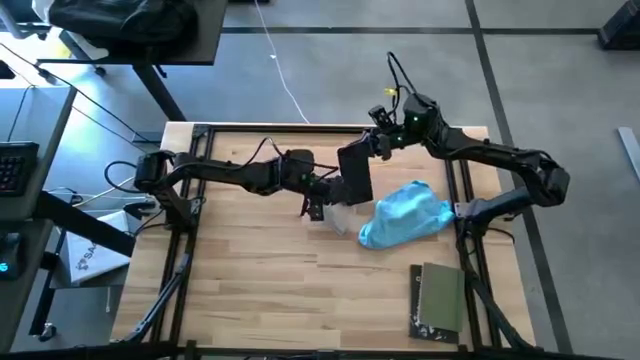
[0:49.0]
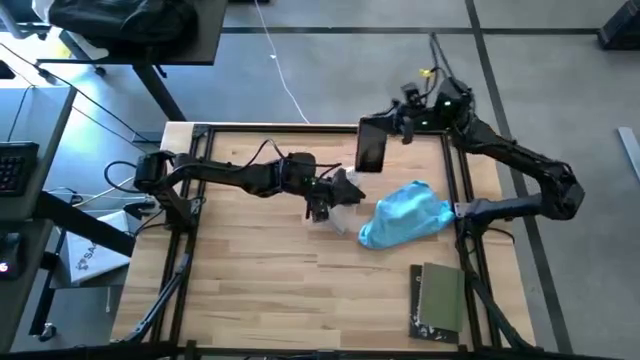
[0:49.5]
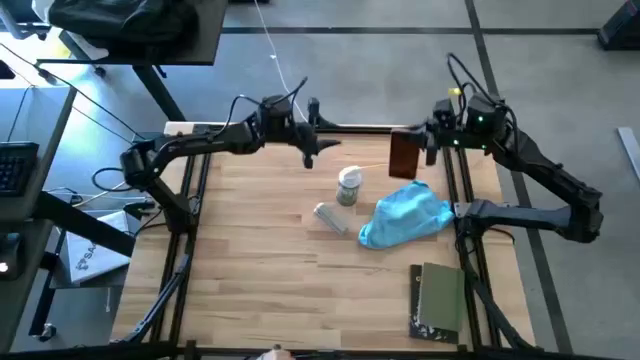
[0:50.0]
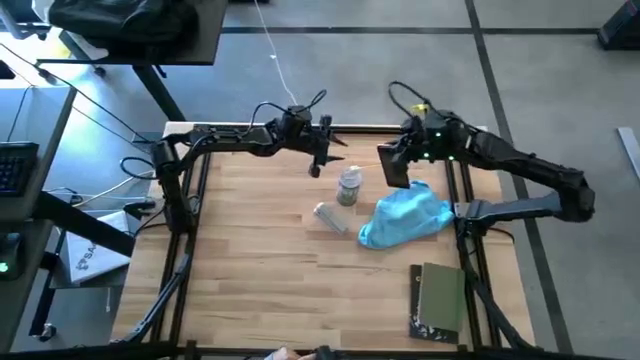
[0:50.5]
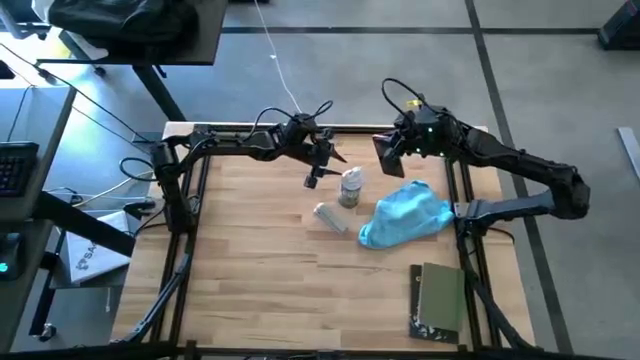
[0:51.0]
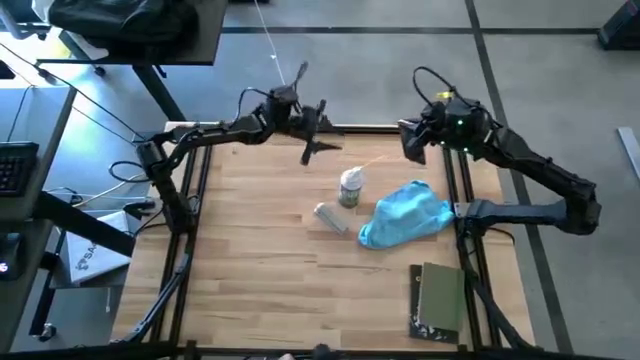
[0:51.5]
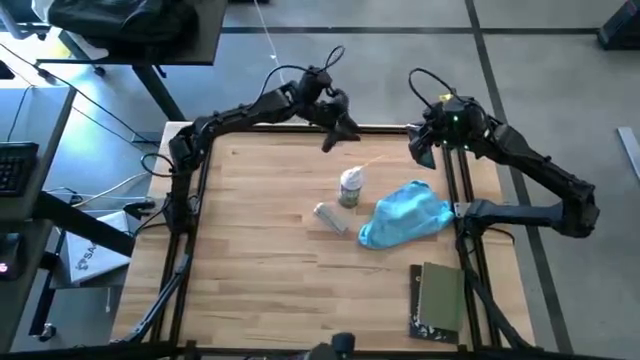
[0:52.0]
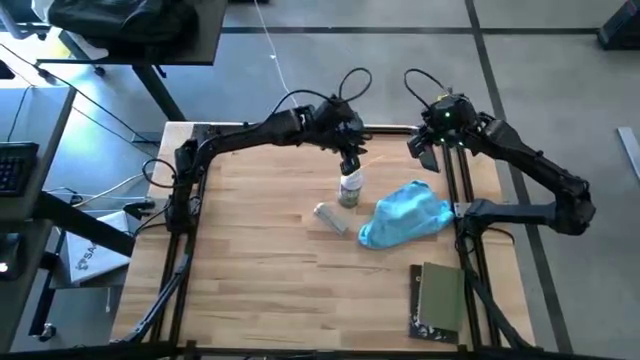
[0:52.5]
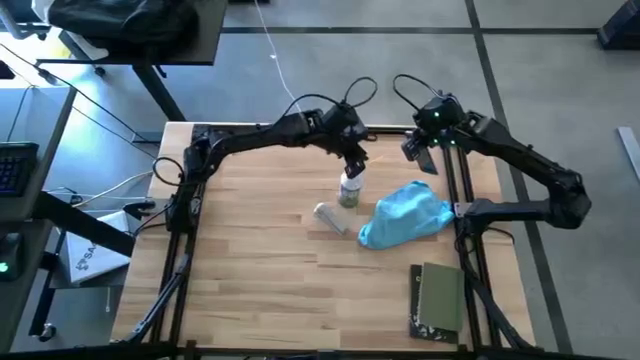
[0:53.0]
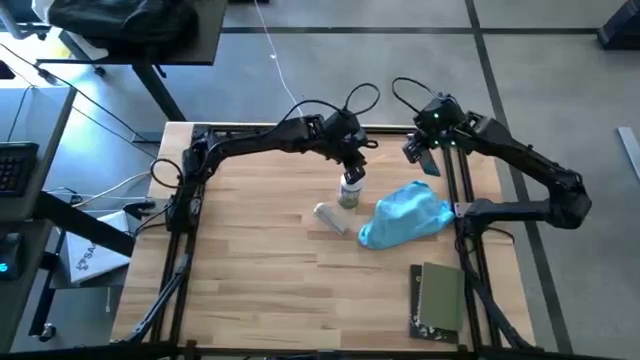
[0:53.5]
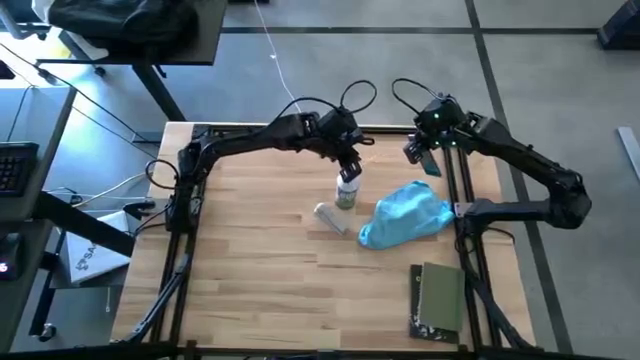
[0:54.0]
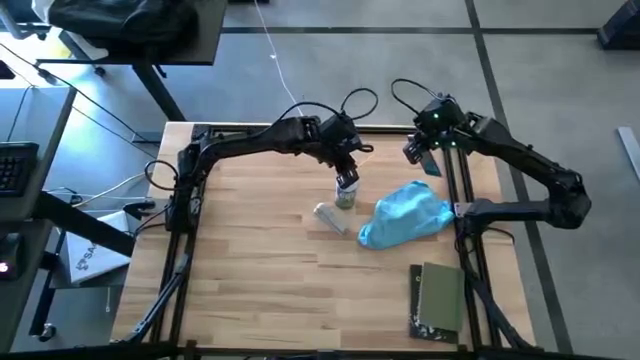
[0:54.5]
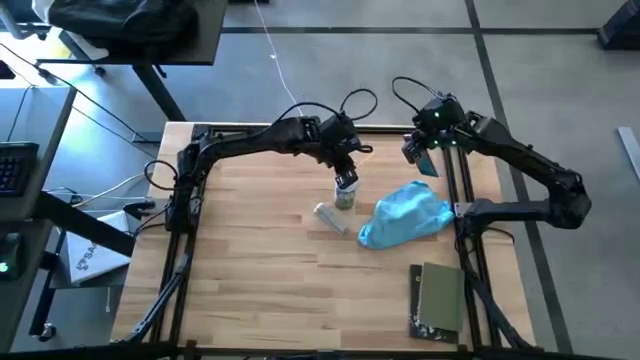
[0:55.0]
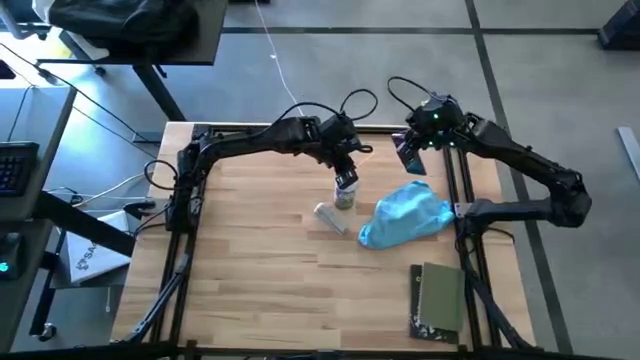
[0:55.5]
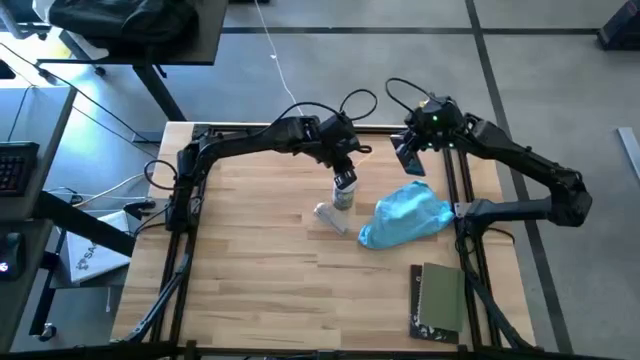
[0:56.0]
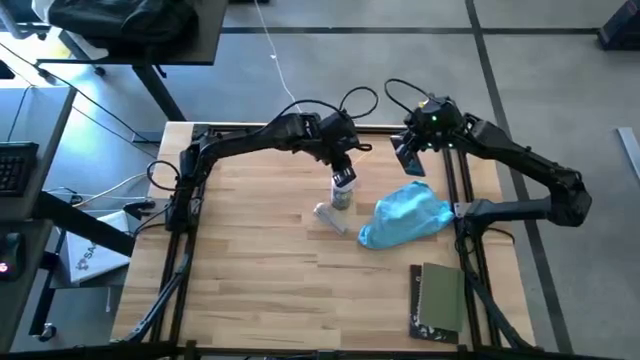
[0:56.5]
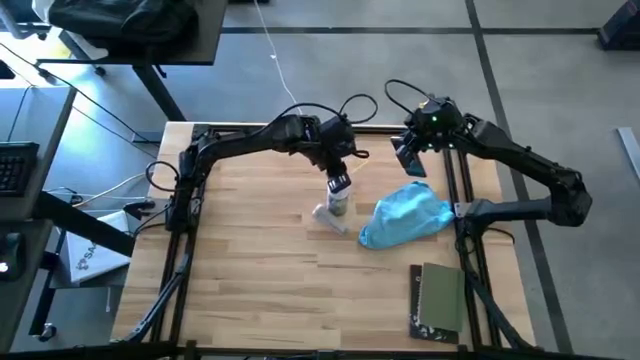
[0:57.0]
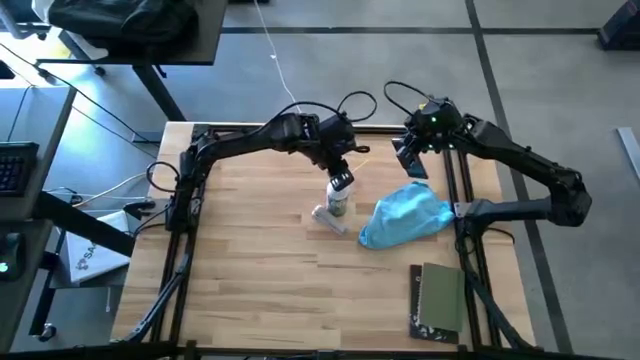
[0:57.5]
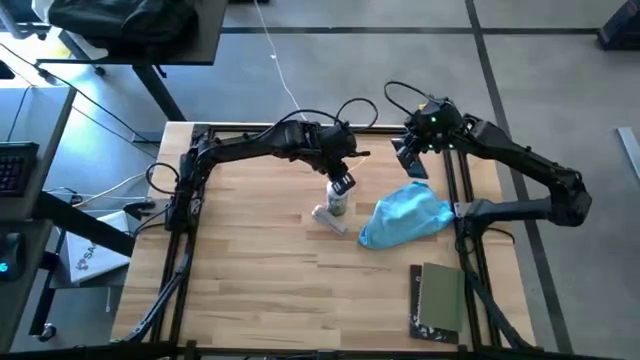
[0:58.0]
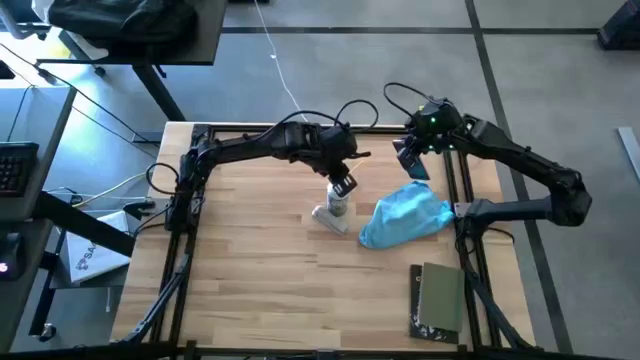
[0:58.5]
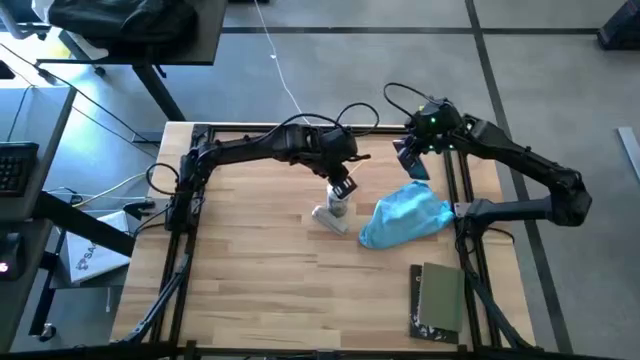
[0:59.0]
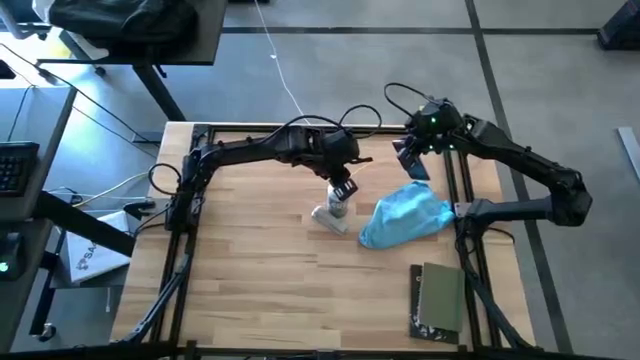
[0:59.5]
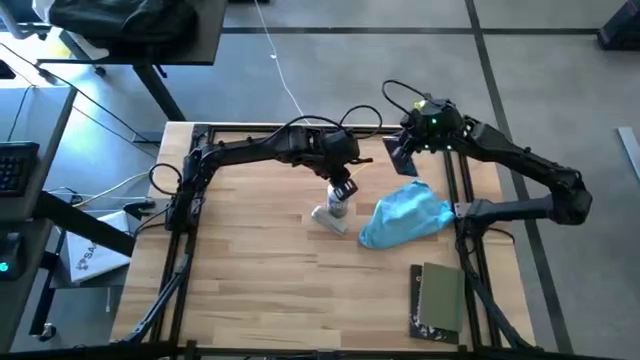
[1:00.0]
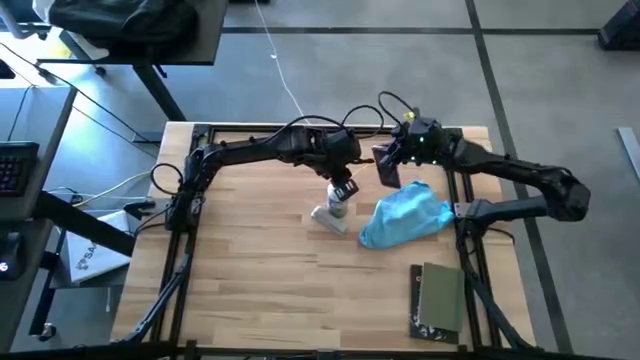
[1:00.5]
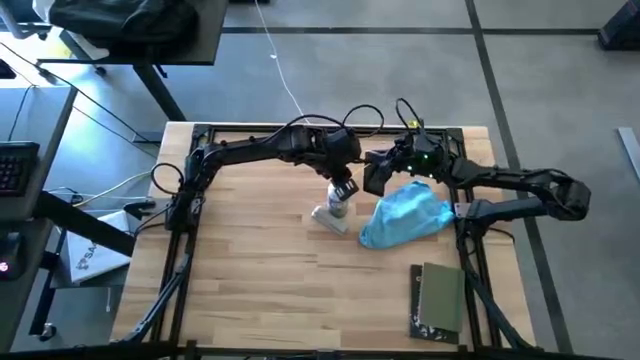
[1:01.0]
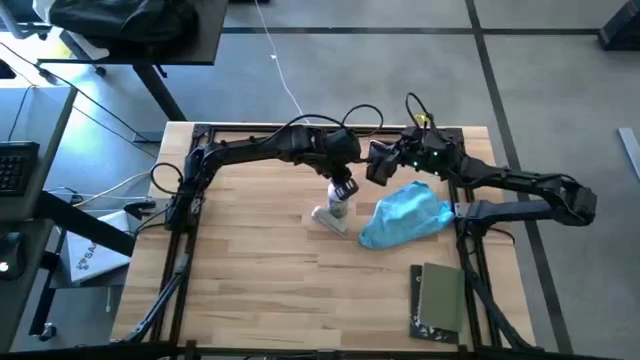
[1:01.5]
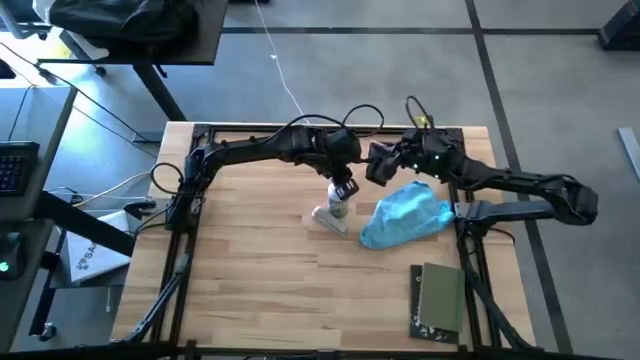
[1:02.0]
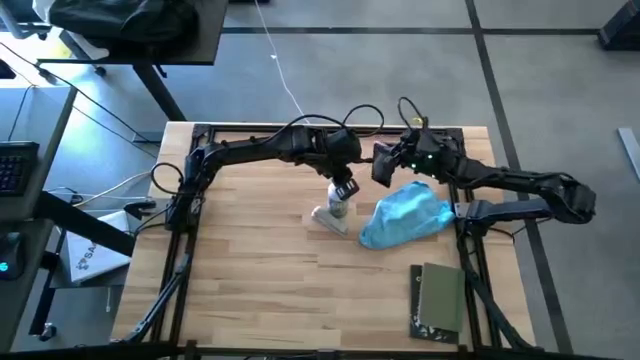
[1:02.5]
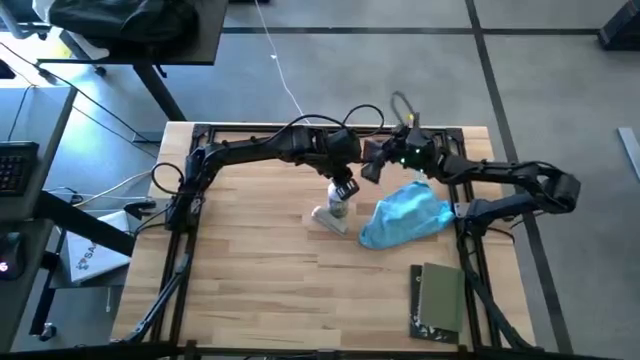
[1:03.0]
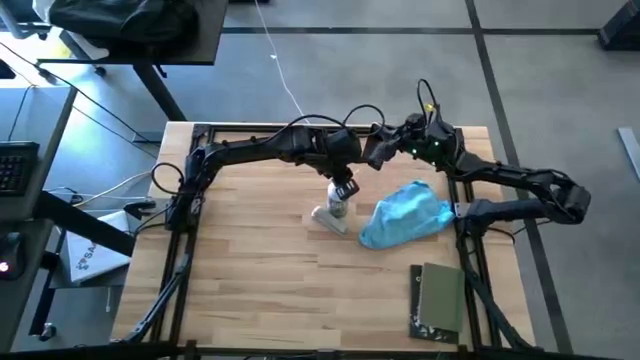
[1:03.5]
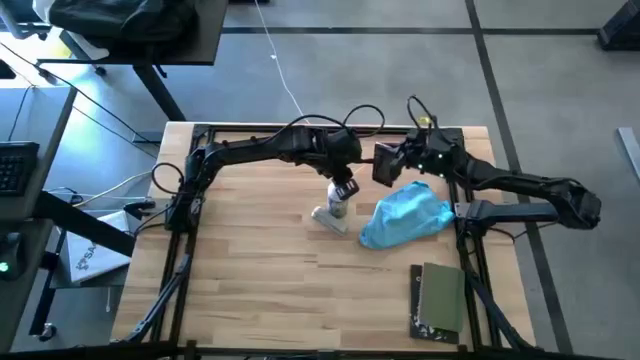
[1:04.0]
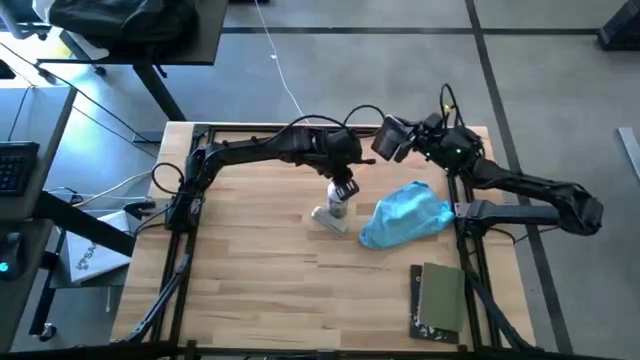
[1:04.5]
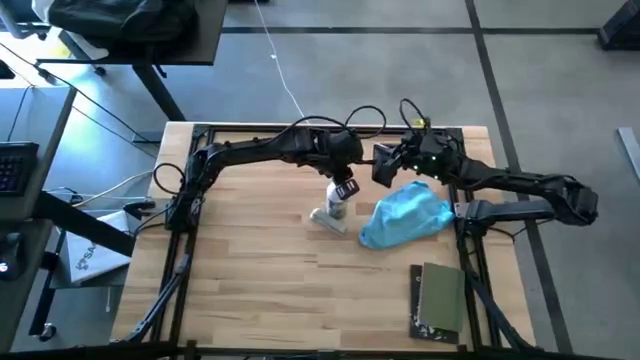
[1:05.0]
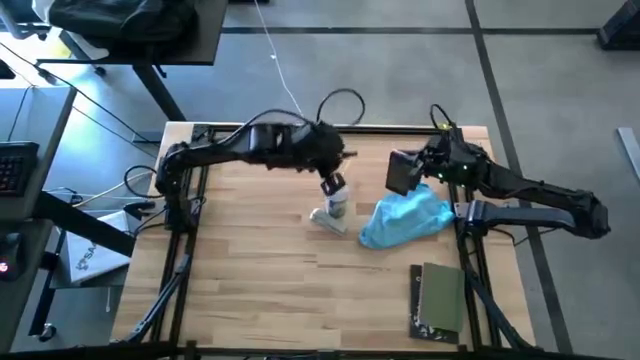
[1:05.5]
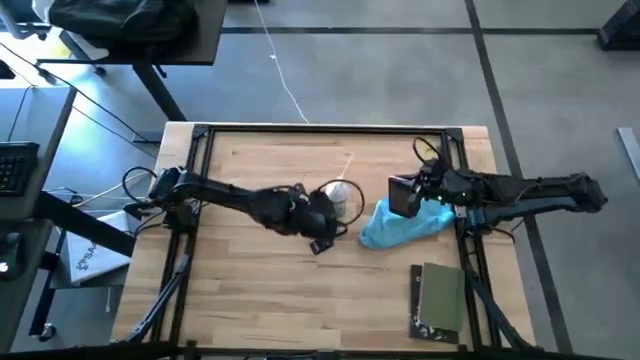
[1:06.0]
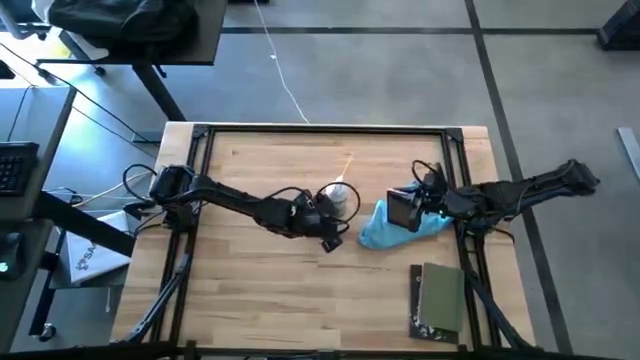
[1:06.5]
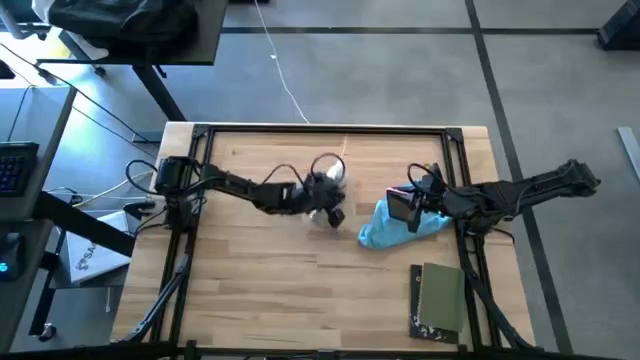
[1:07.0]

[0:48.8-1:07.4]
Task: Apply microfiber cloth
Spray the pink phone with the spray bottle
